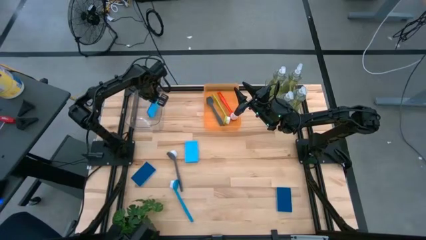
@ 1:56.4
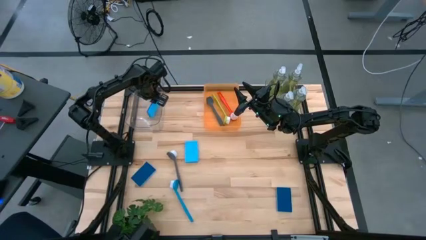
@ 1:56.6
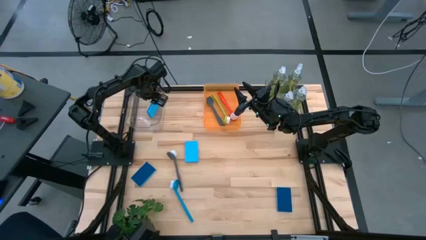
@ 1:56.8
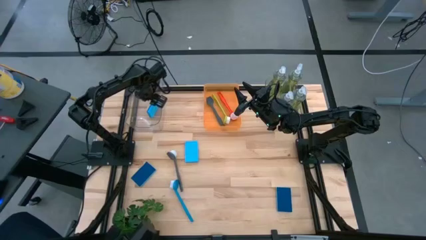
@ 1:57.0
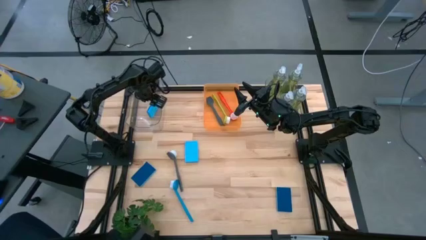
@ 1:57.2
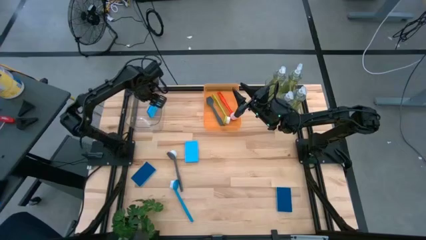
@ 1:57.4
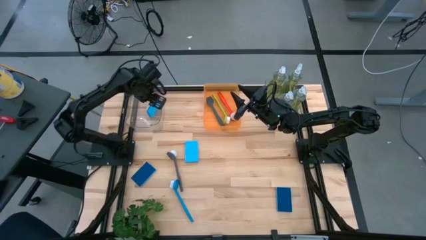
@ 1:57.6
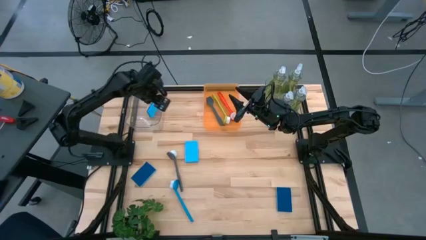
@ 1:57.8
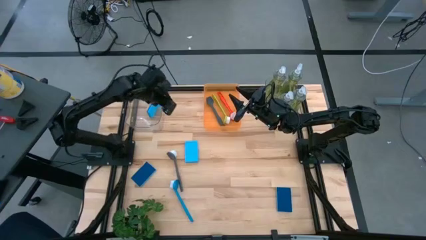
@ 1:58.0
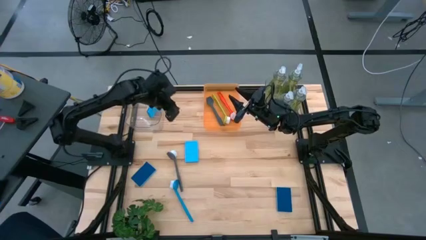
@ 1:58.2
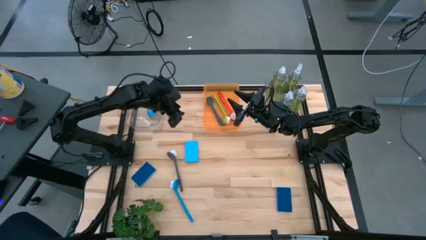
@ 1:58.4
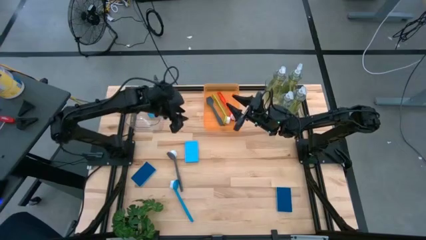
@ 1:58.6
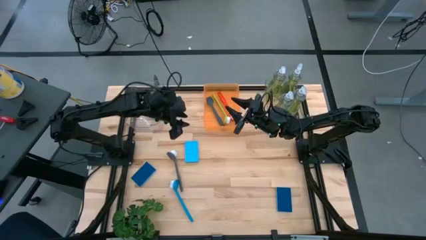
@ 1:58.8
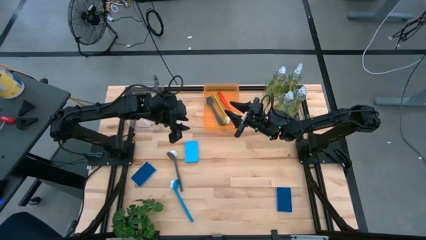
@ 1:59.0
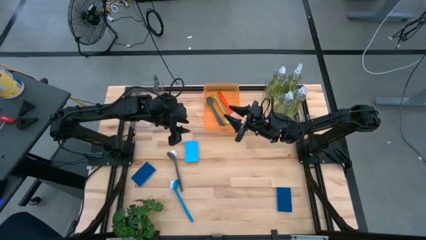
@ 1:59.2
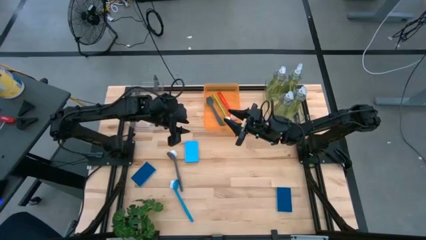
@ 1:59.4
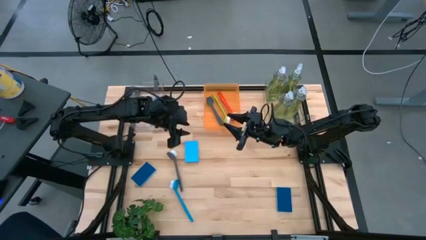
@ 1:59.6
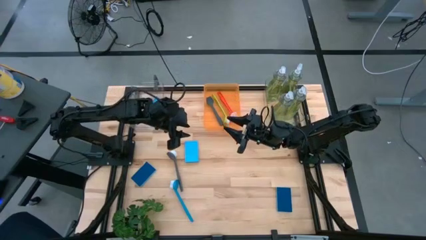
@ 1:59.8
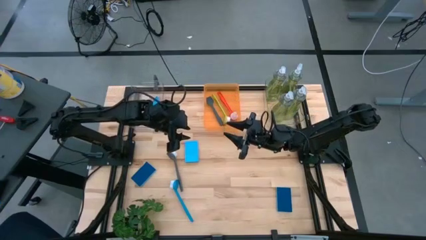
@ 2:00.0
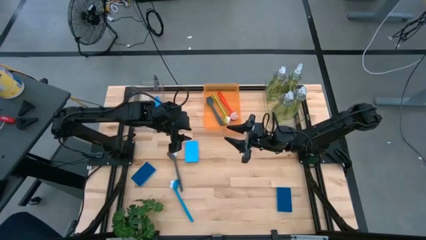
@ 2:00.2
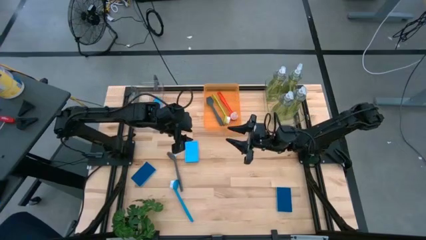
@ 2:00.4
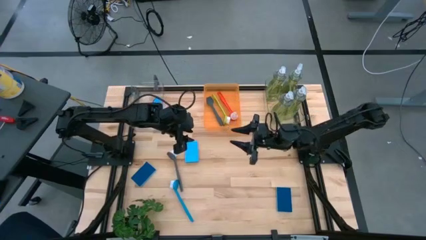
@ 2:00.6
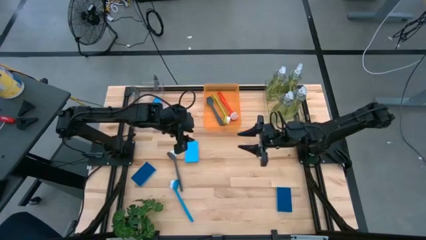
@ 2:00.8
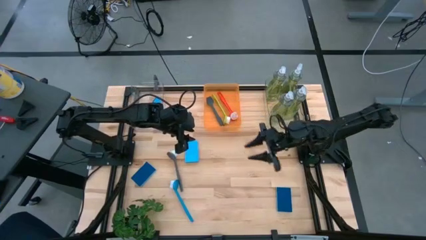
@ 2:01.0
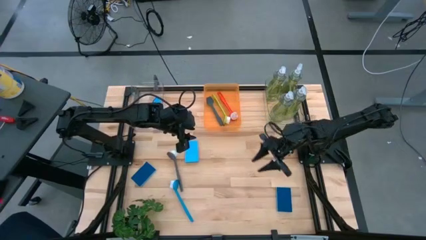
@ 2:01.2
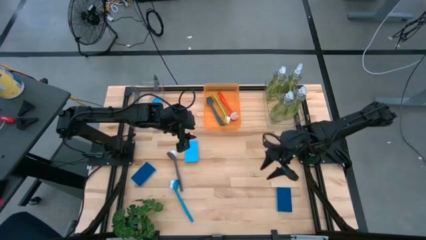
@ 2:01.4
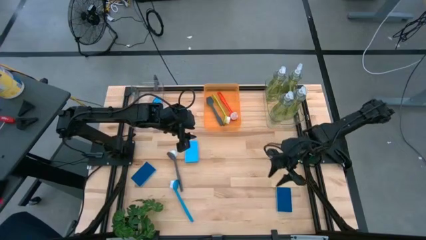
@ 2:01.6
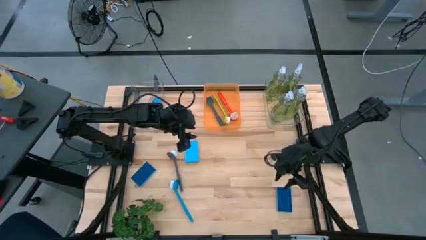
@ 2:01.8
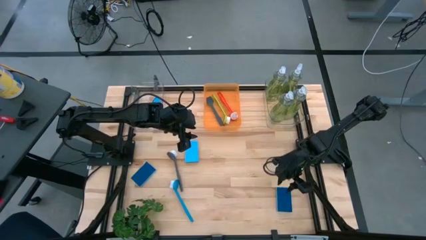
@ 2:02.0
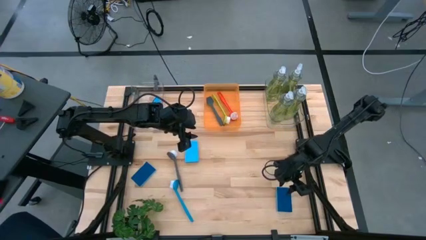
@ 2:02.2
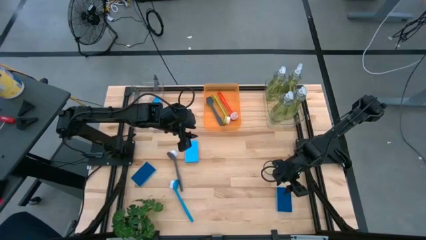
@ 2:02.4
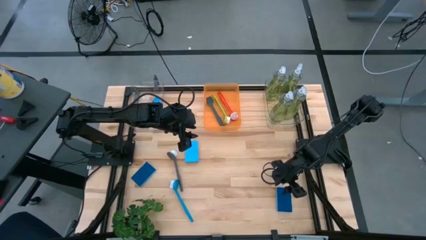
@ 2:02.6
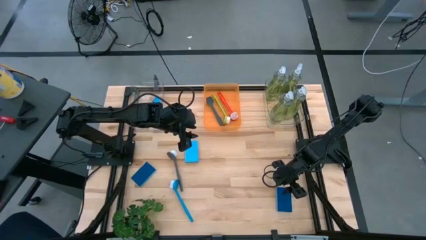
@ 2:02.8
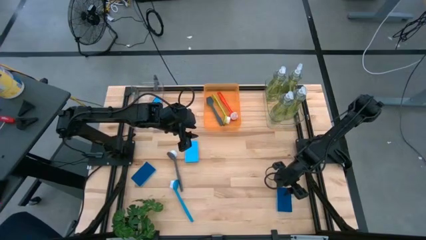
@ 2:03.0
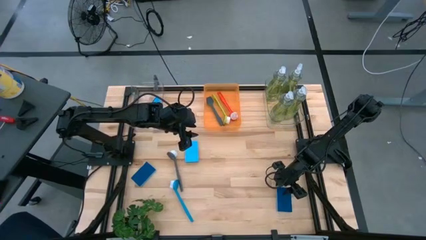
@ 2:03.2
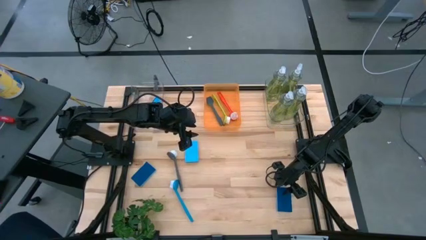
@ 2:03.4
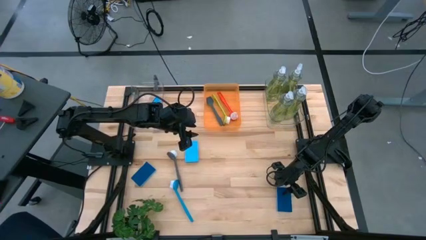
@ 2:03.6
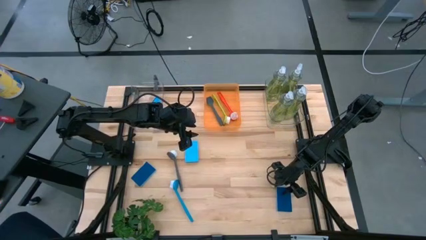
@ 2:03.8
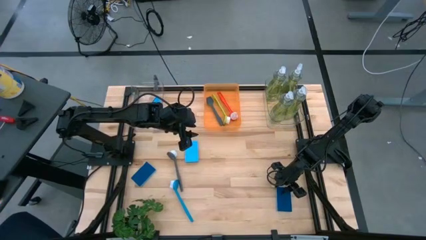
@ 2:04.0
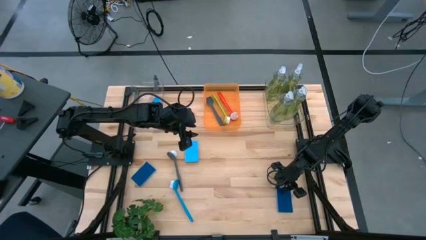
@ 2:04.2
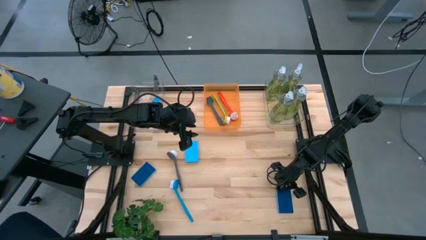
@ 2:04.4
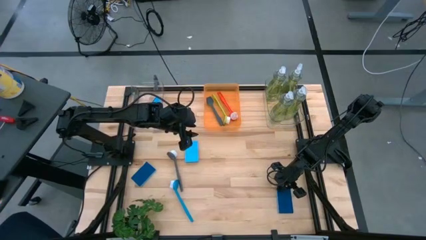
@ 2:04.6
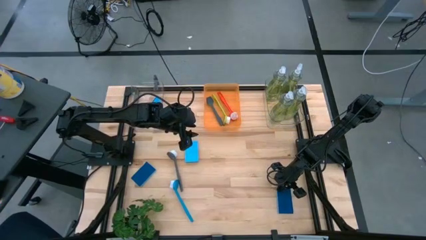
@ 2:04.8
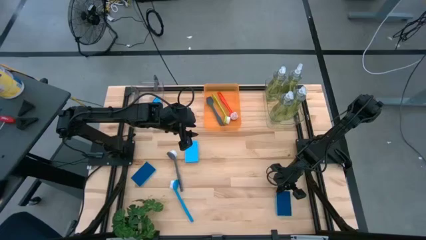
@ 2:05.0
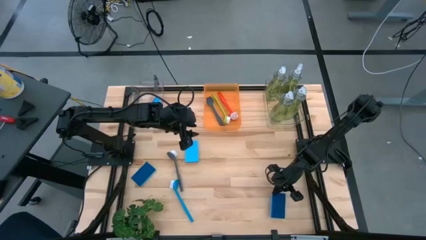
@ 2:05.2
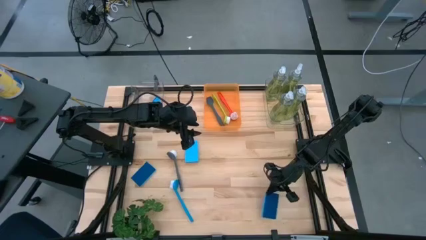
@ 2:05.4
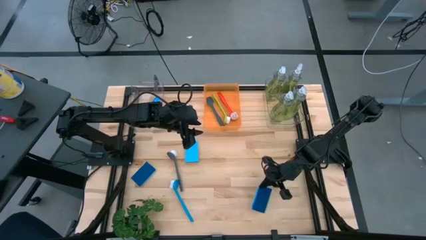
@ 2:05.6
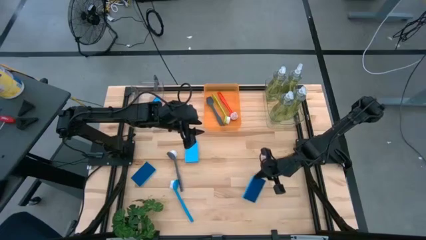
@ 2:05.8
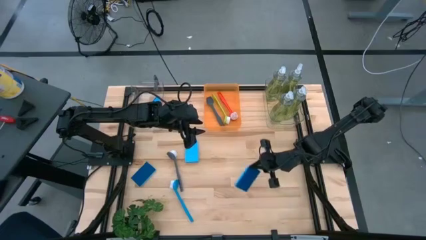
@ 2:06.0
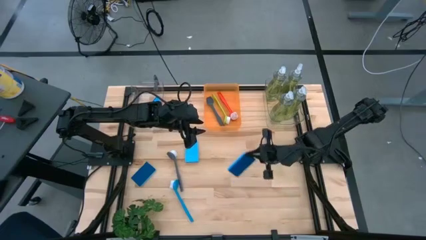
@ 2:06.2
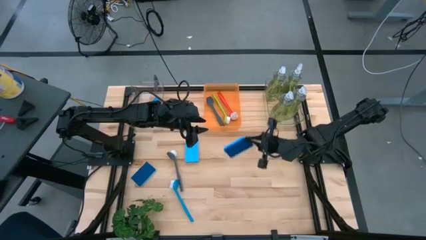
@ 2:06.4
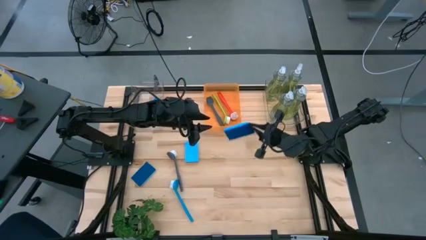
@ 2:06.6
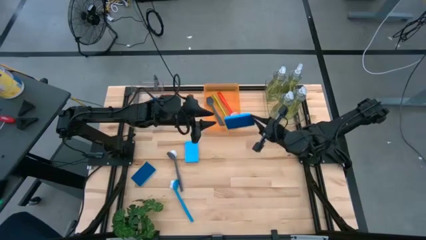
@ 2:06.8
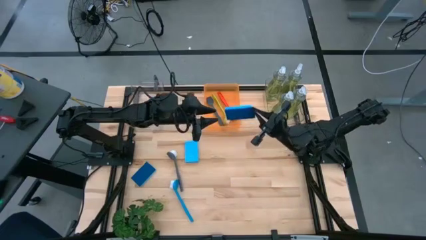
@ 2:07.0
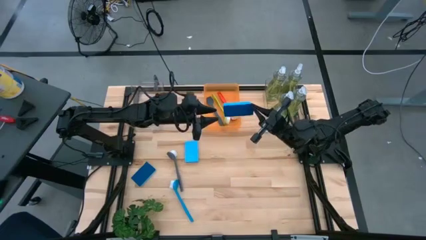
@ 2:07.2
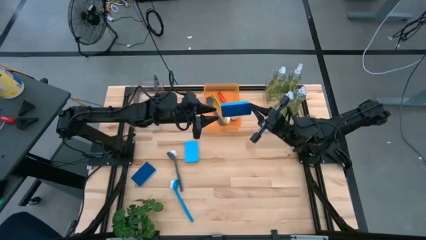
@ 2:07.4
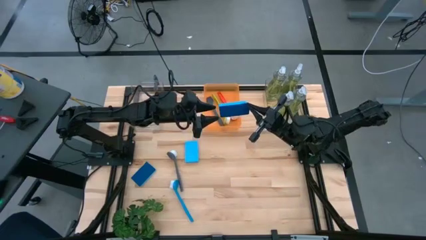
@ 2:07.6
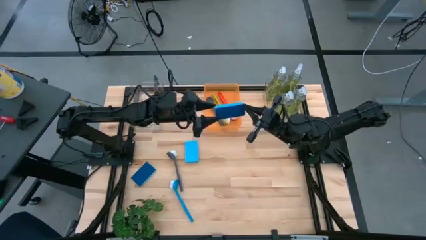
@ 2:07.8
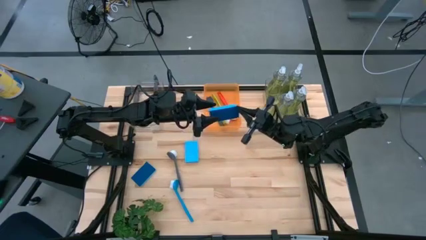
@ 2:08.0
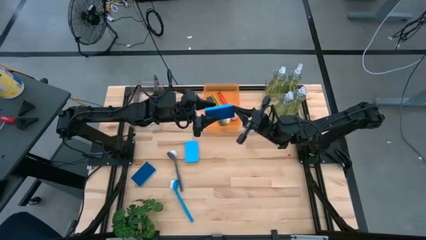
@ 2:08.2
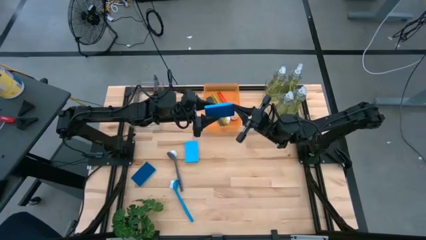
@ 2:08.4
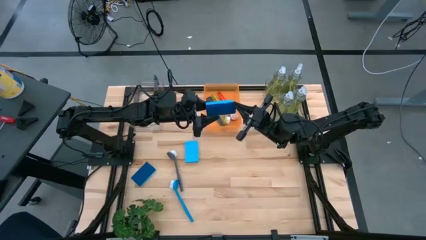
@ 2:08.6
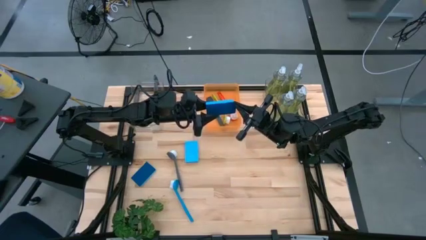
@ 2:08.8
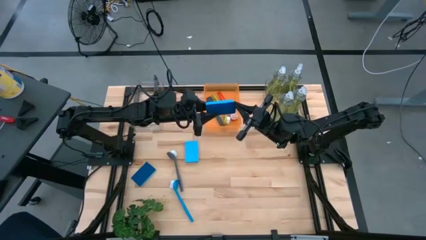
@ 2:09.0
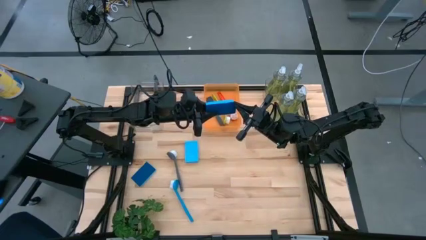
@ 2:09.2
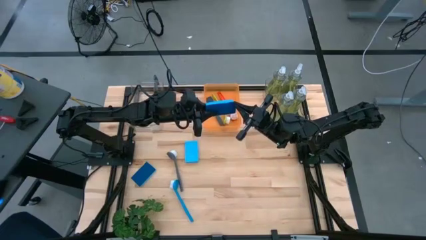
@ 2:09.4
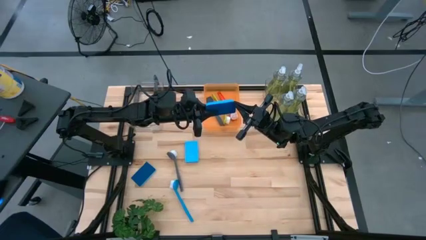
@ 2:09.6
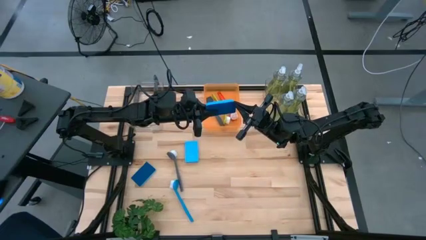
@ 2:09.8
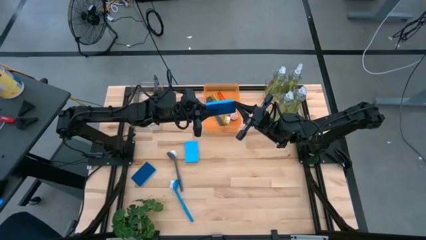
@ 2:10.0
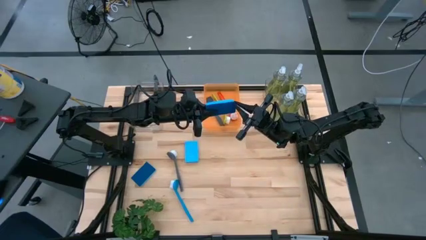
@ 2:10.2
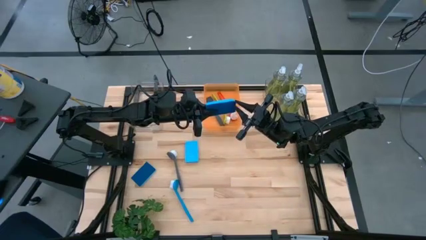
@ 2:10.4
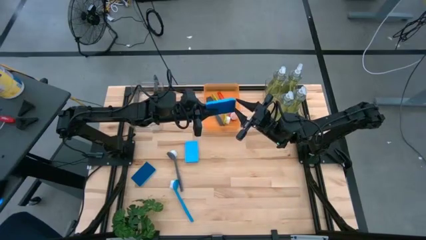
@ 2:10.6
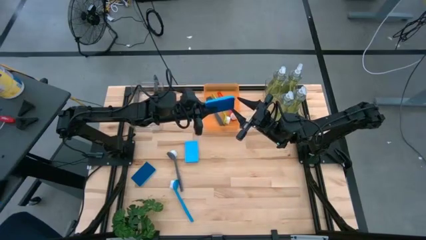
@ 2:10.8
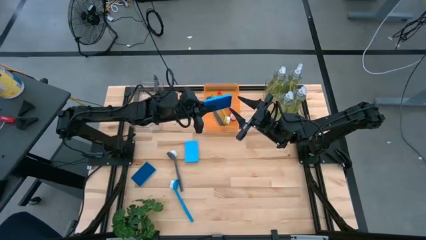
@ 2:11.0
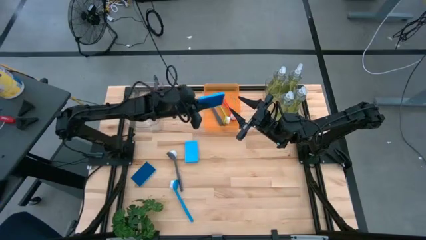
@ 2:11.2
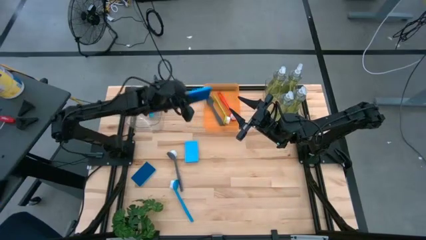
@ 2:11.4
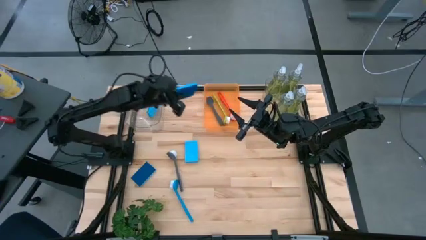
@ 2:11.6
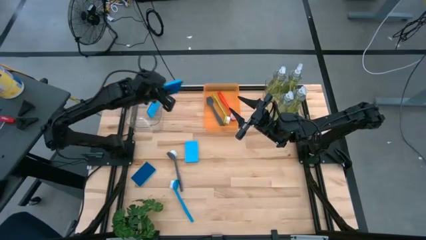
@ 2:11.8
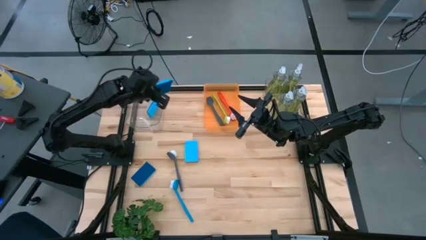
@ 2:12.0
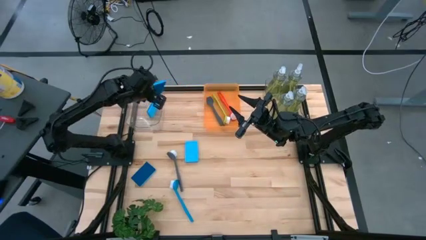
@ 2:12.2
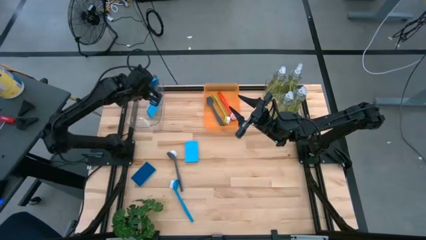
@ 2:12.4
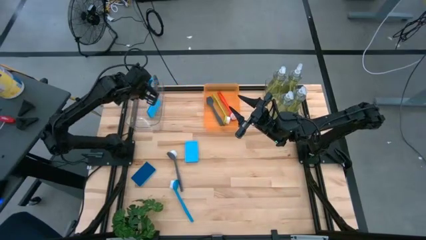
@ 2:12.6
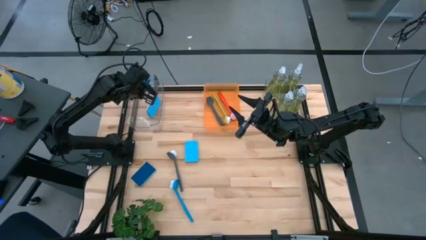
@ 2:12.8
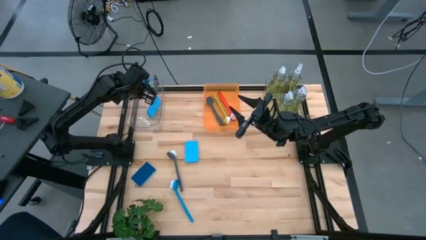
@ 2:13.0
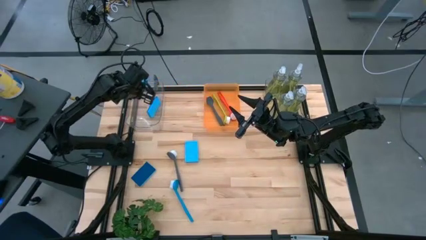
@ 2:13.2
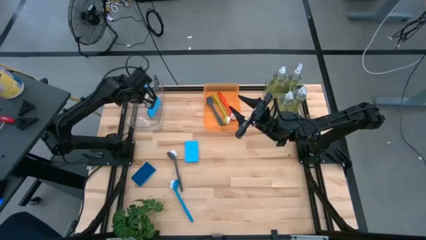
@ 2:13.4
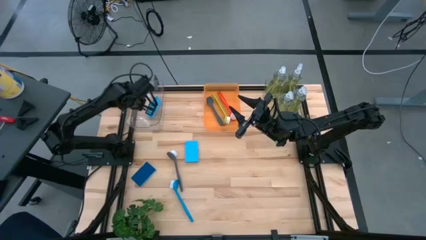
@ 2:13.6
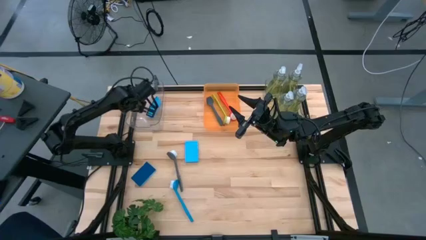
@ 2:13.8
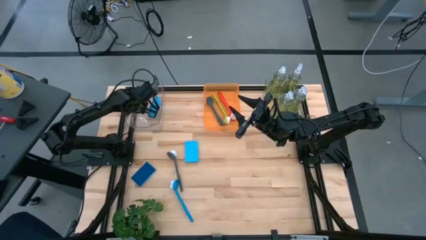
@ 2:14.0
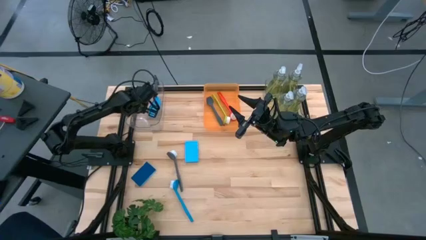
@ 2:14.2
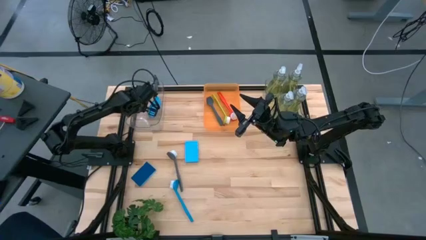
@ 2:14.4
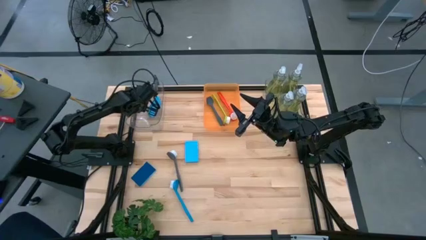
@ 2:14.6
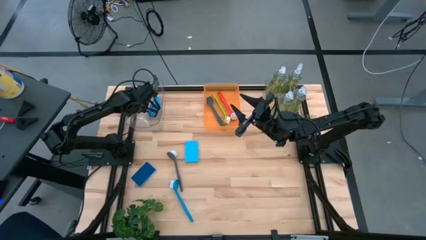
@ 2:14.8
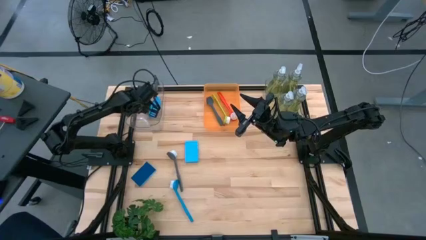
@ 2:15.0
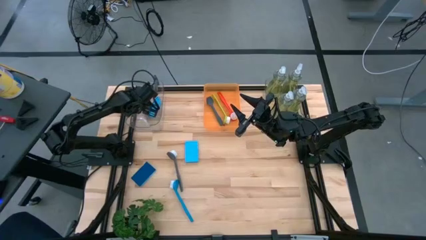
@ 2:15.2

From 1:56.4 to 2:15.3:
Task: Pick & Place Kitchen Sink Supplies
Put the blue sponge into the left transparent bin
